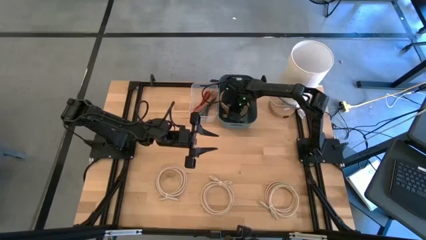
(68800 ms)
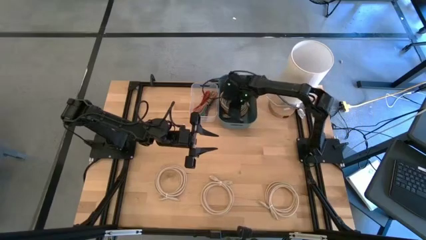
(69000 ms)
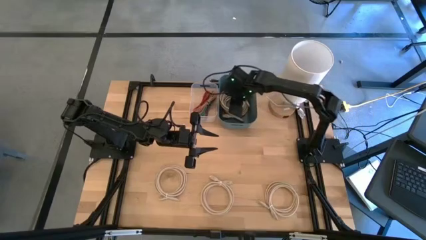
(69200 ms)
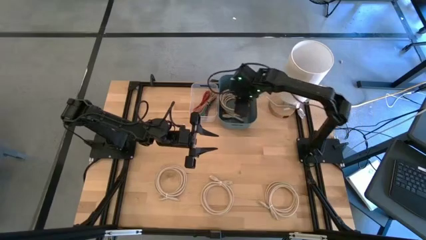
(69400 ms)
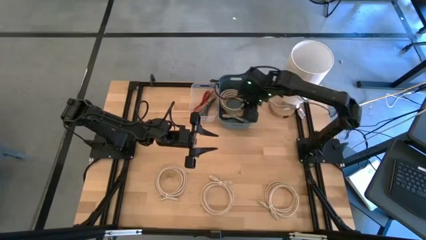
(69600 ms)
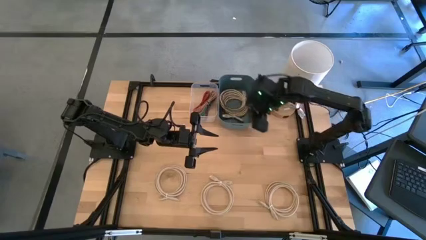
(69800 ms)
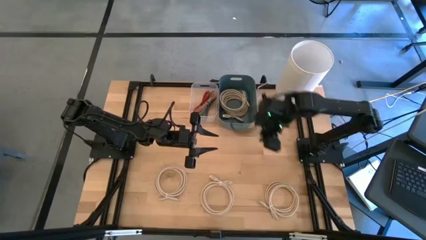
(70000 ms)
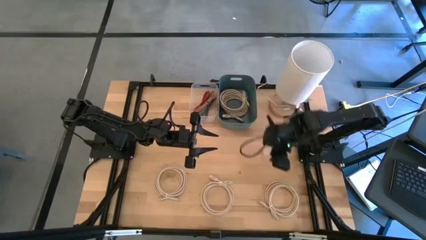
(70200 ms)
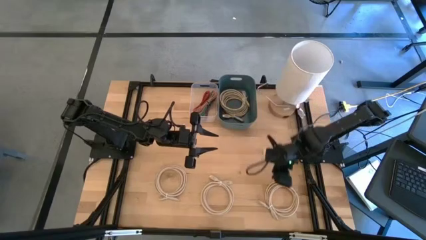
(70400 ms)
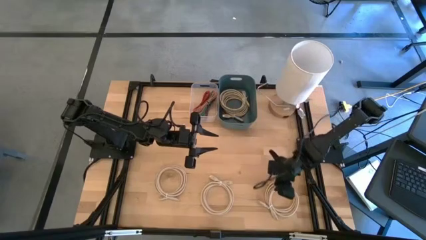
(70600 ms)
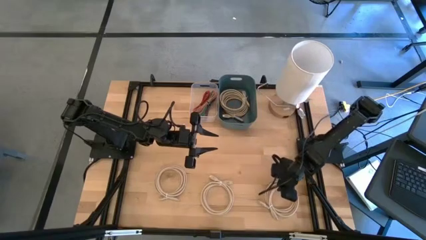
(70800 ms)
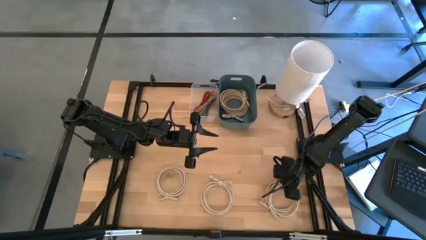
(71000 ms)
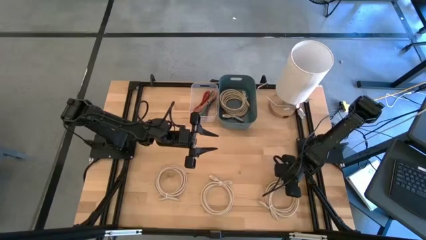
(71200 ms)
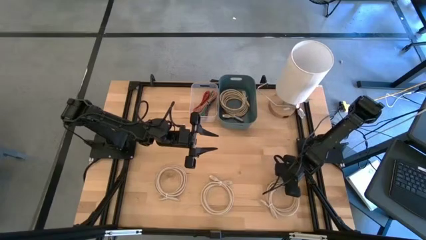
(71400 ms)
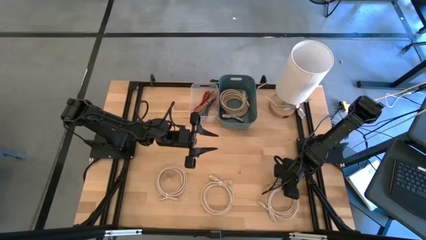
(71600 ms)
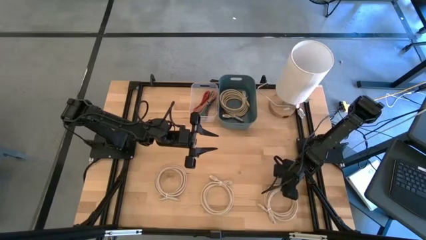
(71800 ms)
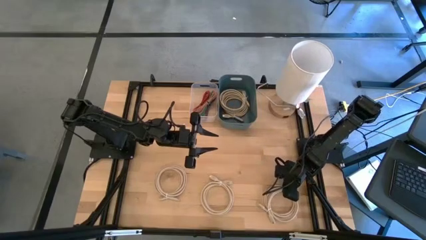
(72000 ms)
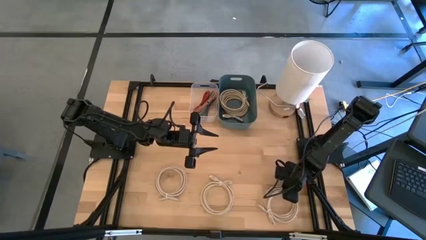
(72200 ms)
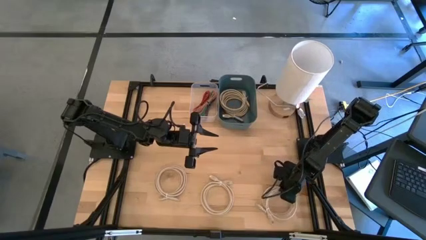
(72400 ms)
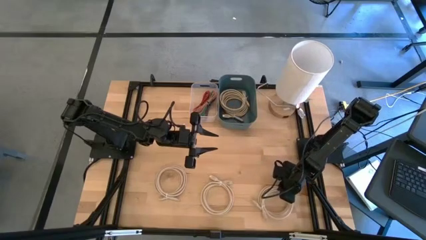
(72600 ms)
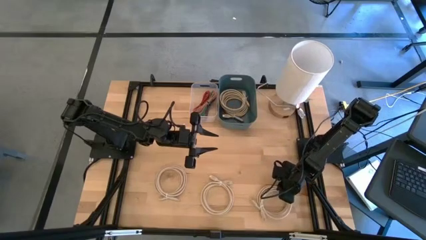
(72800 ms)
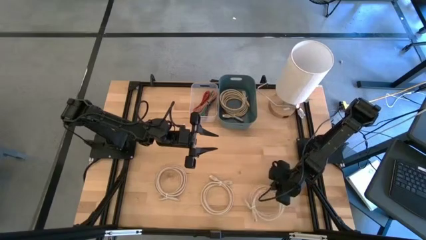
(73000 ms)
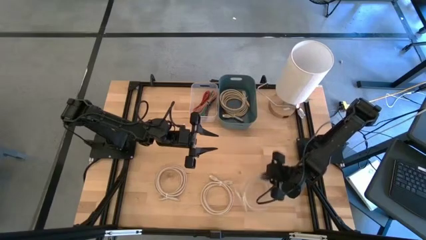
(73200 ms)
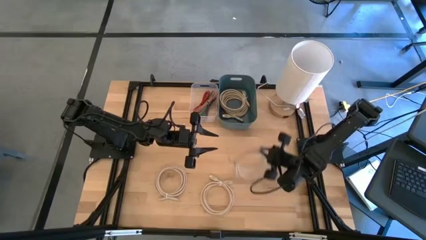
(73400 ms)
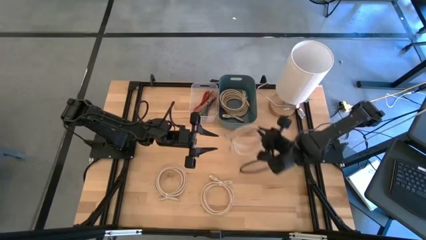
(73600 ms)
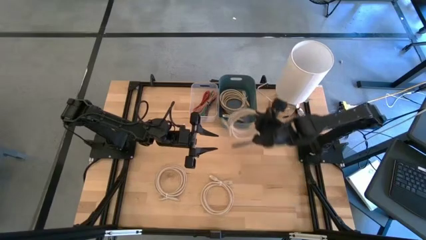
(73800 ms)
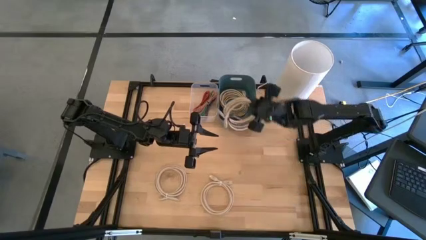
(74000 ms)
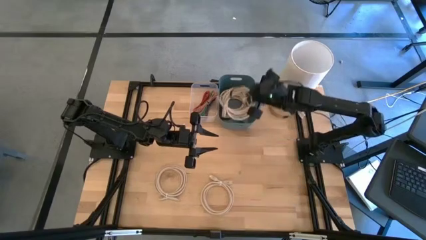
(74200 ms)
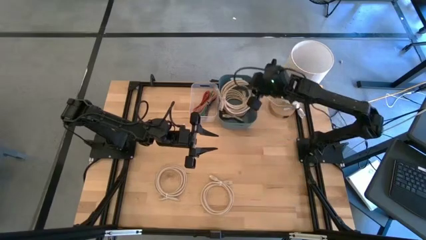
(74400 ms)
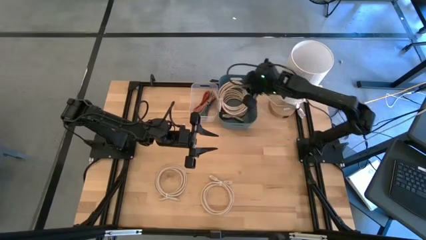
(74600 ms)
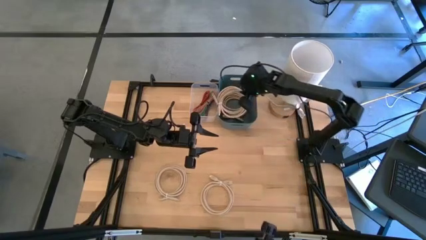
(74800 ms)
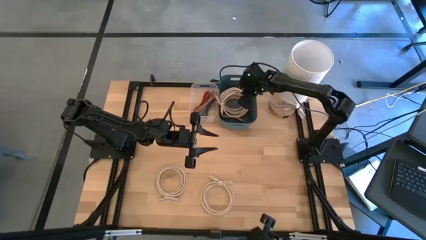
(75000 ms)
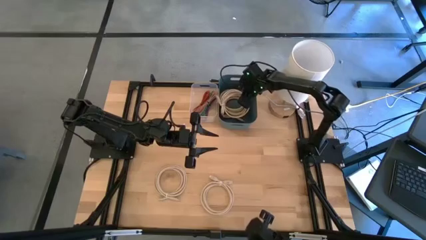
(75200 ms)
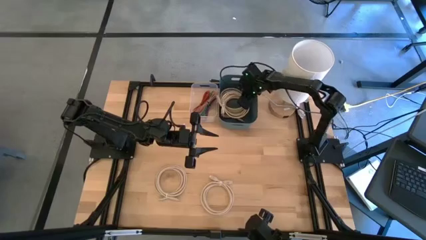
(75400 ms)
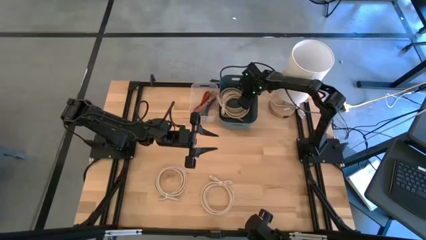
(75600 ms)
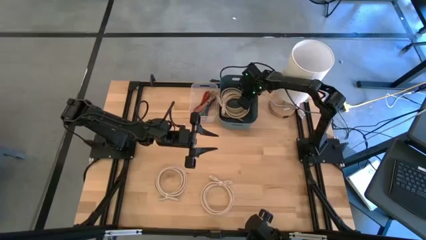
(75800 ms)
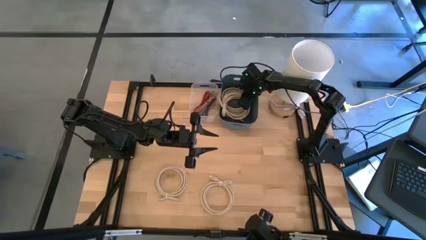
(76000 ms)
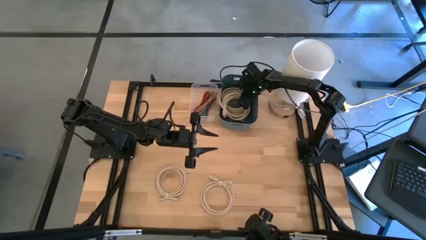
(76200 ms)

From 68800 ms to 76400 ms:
Task: Pick and place USB-C Cables
Put the white HDMI cable into the blue bin

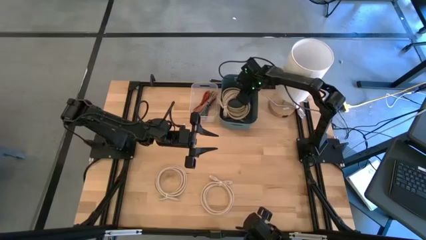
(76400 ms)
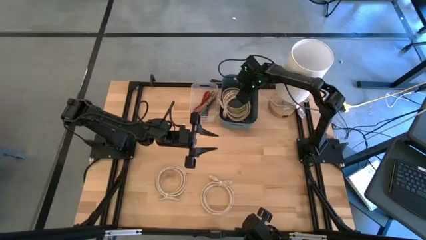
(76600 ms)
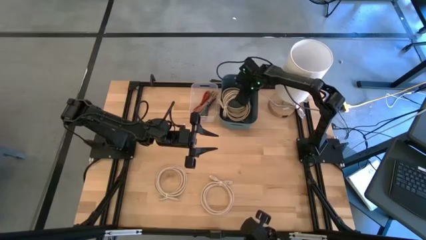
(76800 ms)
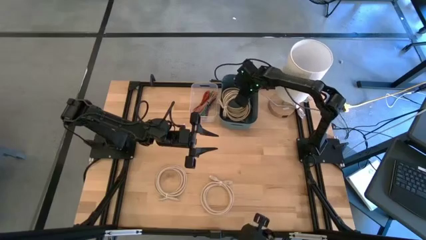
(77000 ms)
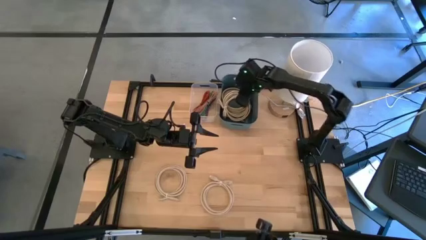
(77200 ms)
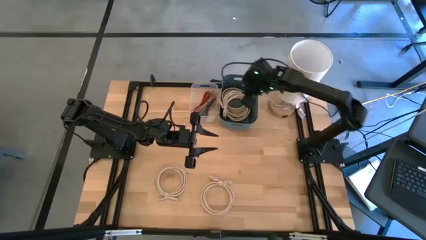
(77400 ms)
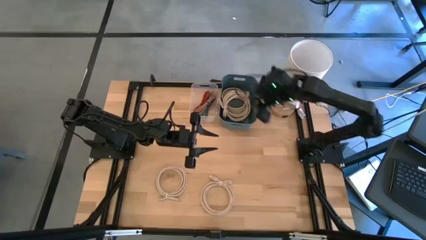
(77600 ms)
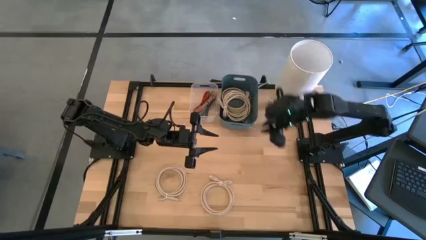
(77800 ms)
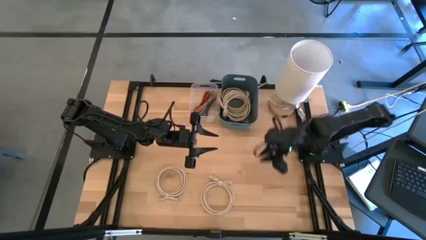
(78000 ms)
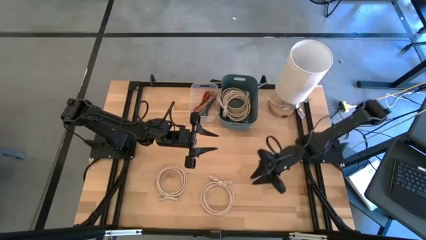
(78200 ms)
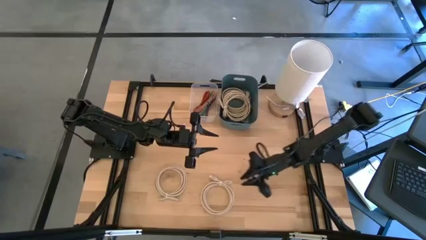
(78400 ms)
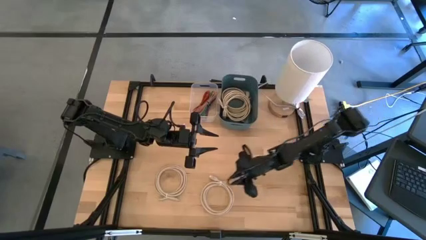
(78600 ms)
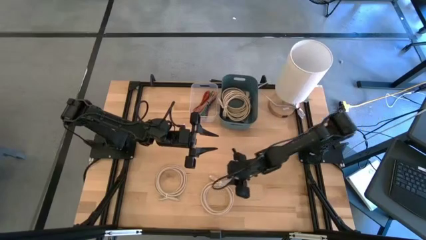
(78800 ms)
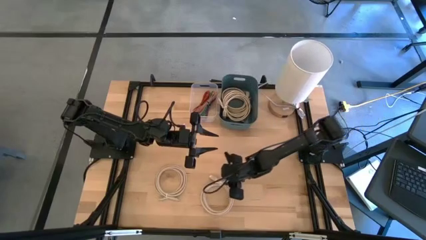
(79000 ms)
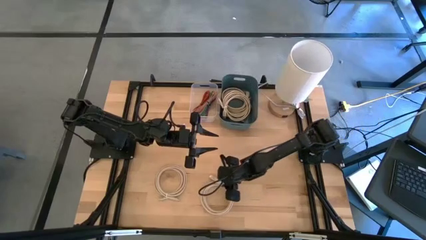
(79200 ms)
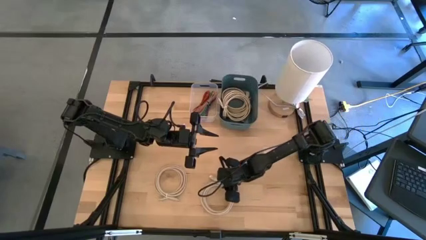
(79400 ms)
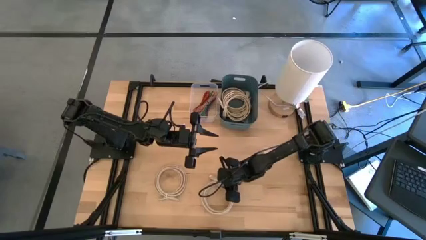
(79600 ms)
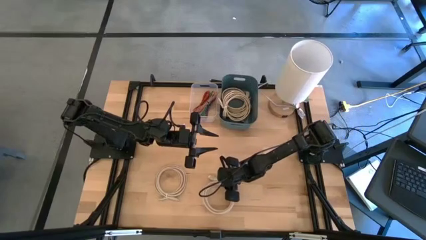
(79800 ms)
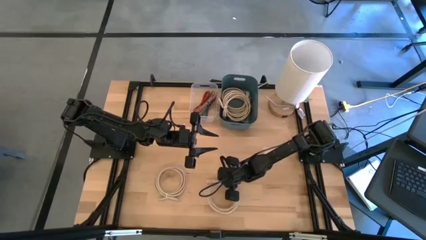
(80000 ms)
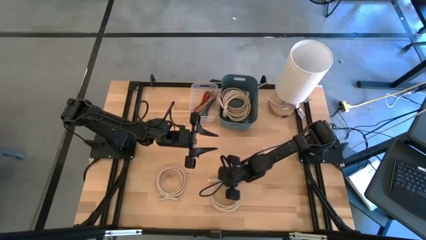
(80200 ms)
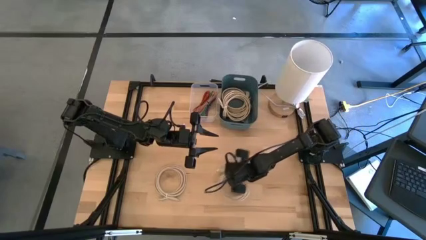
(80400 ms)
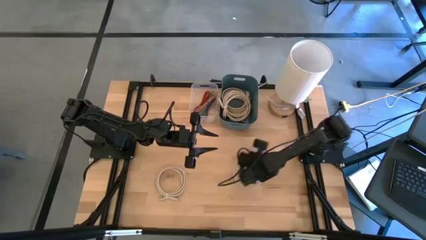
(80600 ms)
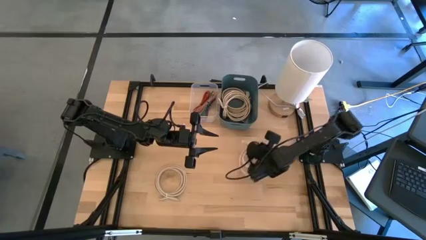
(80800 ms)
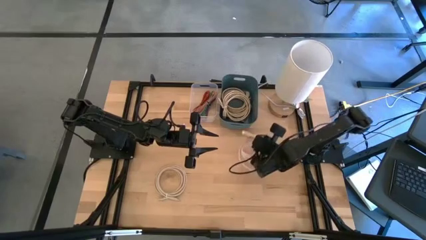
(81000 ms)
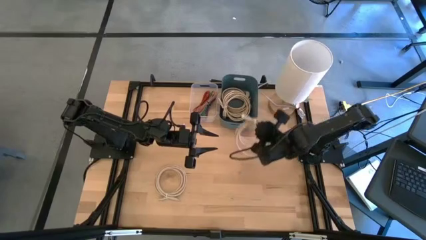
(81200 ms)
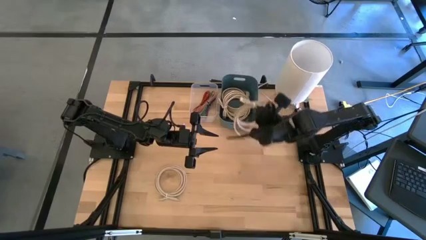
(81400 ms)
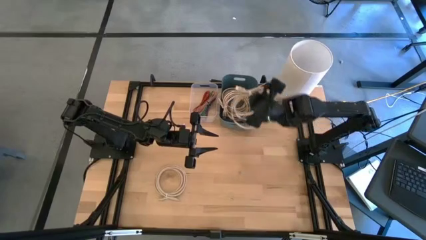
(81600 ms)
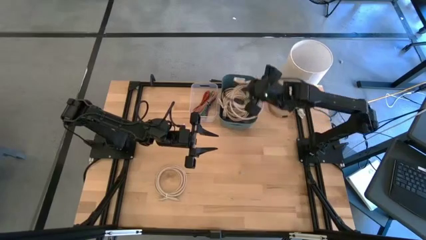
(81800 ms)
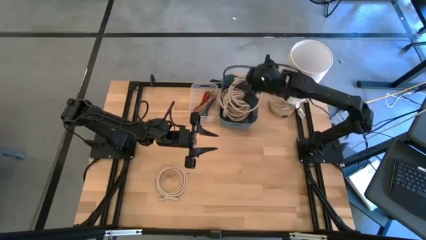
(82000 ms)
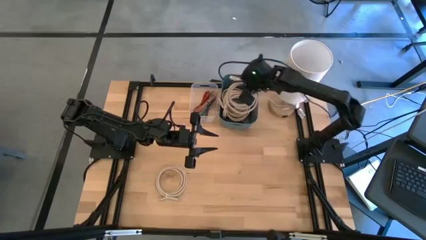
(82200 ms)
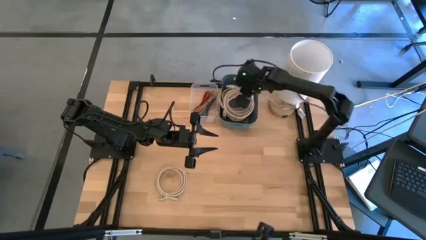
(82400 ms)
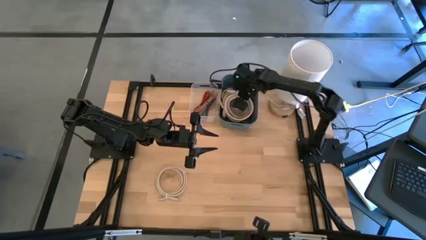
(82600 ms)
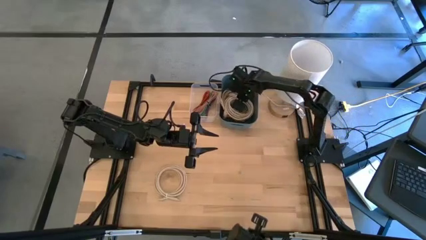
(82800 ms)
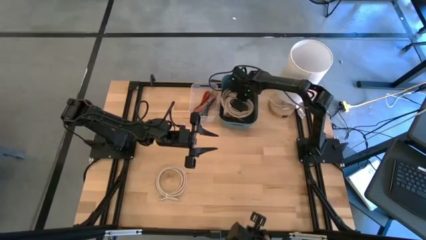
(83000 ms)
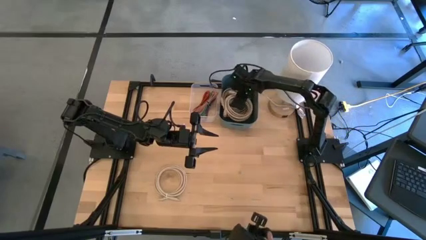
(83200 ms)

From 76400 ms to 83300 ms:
Put the white HDMI cable into the blue bin

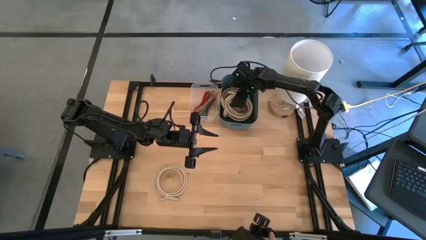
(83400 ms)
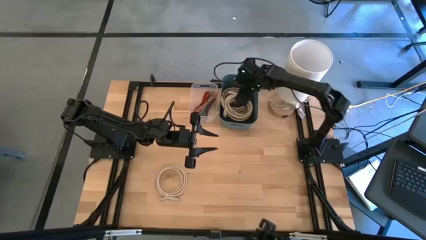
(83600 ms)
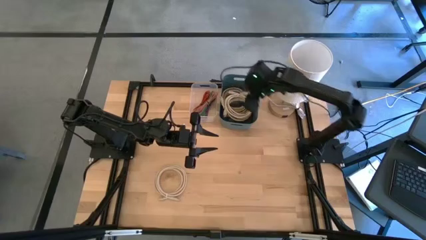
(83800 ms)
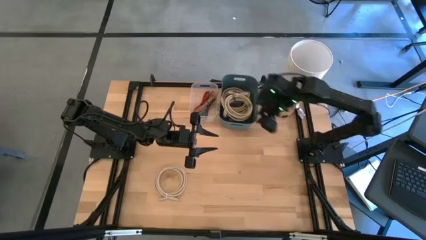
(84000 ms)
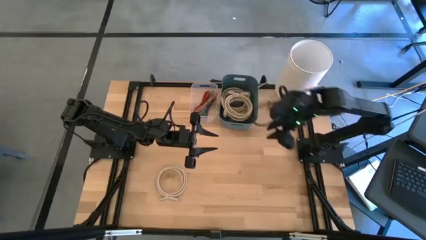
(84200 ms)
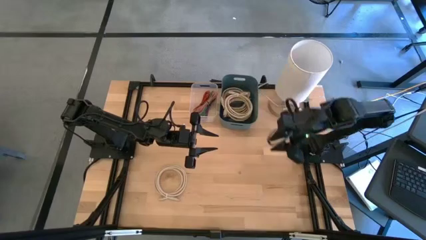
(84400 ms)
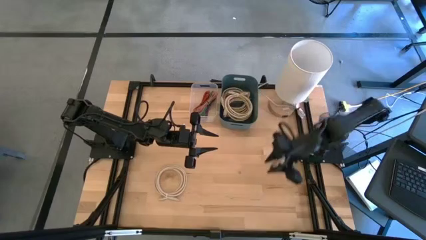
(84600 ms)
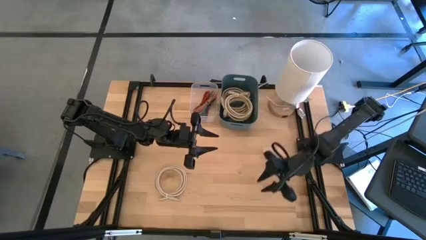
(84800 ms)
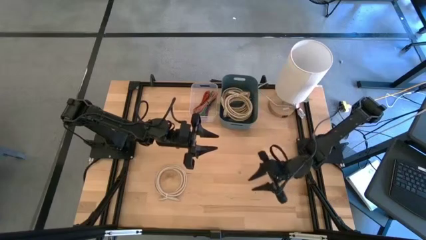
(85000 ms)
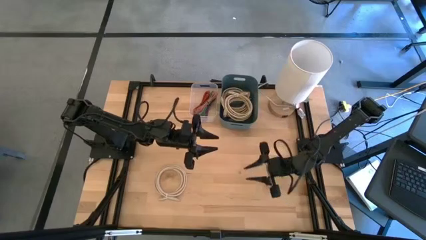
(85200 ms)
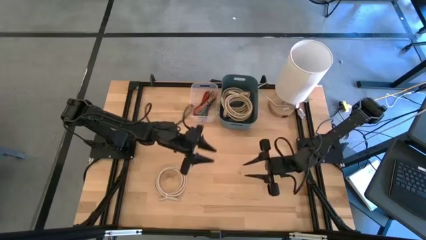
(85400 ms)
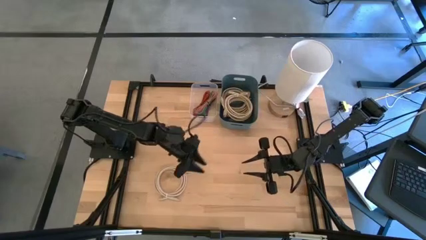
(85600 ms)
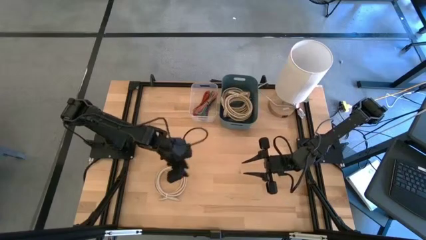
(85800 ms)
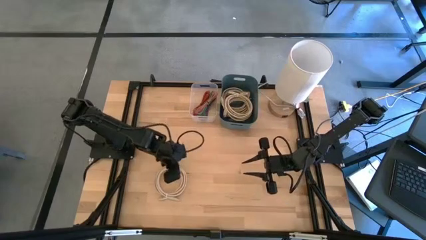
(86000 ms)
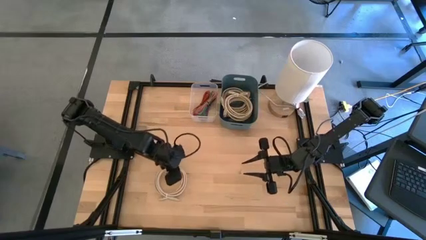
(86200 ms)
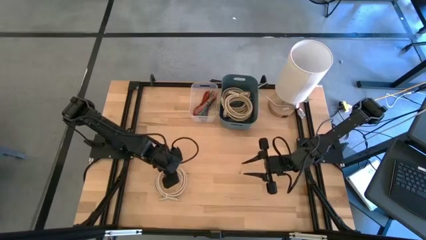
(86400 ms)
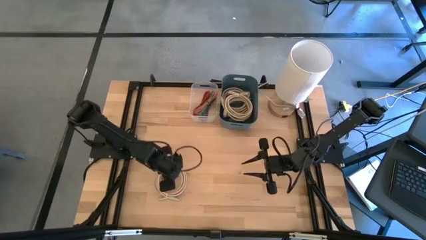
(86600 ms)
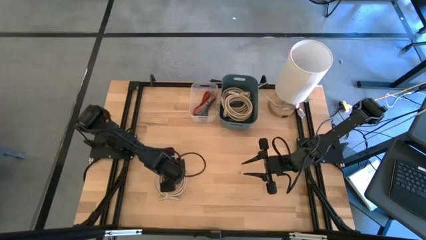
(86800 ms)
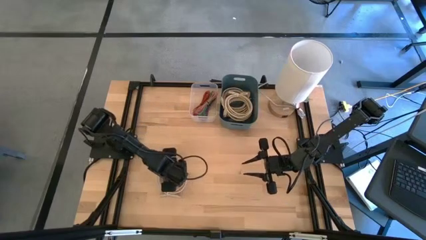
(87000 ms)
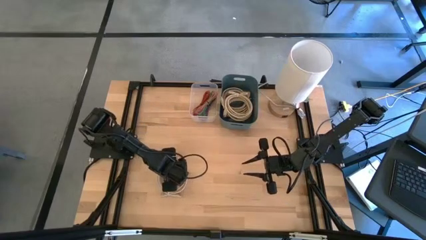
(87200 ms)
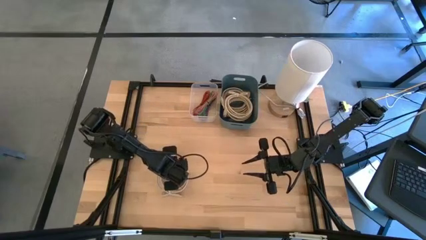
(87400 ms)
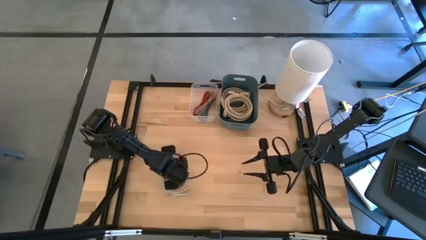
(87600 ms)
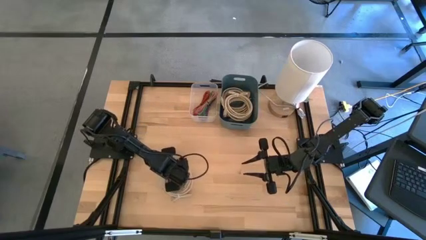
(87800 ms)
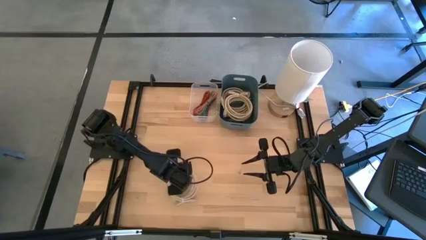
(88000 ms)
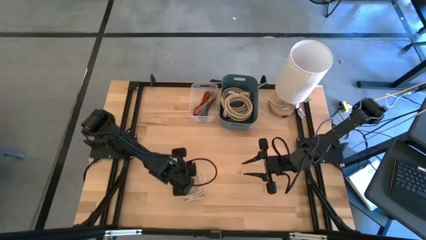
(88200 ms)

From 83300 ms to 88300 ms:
Put the white HDMI cable into the blue bin
